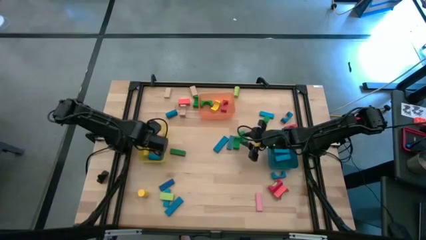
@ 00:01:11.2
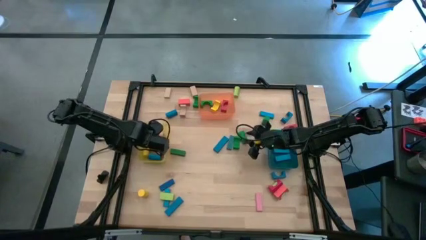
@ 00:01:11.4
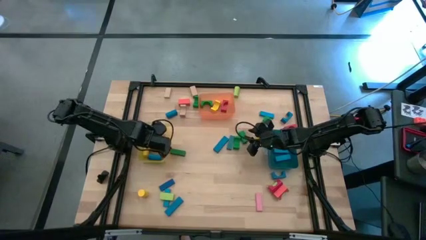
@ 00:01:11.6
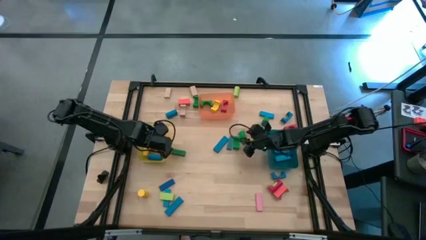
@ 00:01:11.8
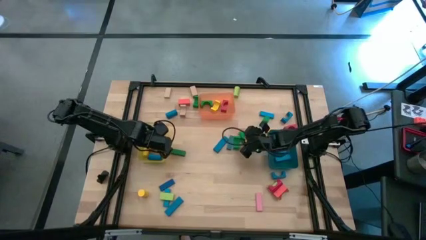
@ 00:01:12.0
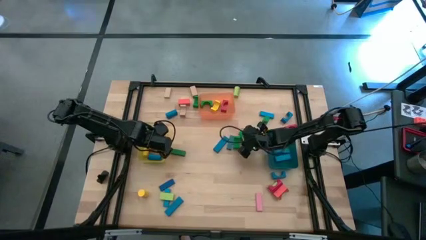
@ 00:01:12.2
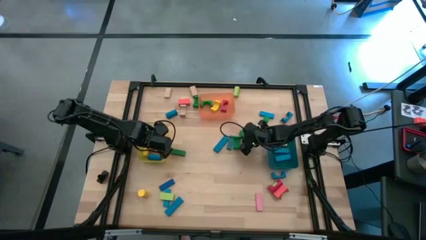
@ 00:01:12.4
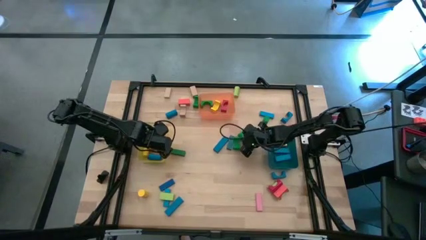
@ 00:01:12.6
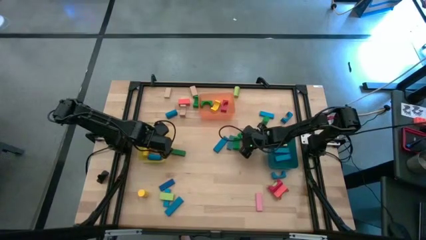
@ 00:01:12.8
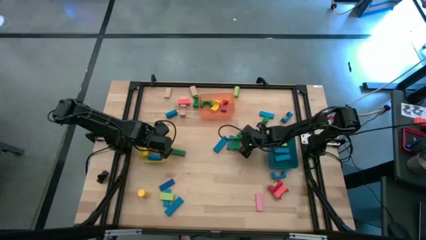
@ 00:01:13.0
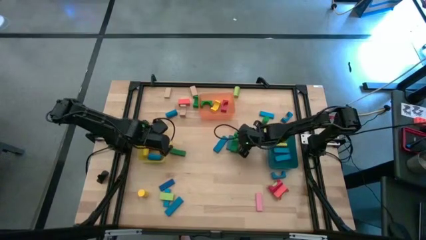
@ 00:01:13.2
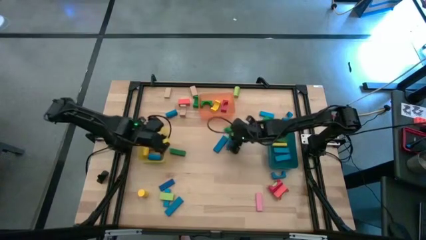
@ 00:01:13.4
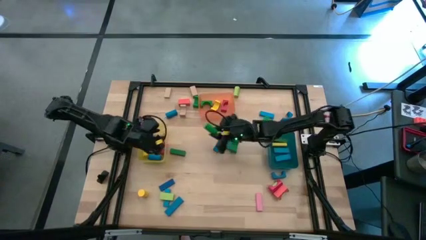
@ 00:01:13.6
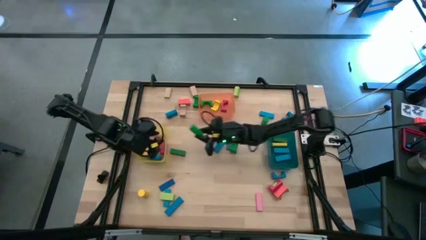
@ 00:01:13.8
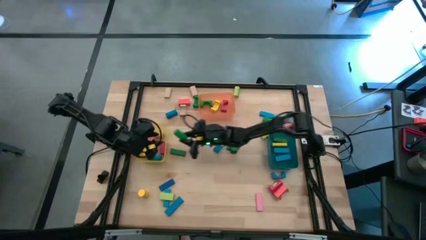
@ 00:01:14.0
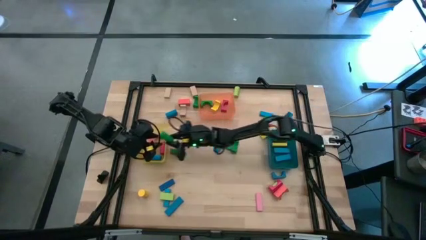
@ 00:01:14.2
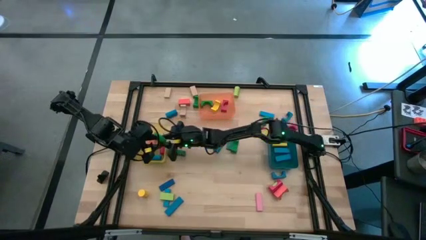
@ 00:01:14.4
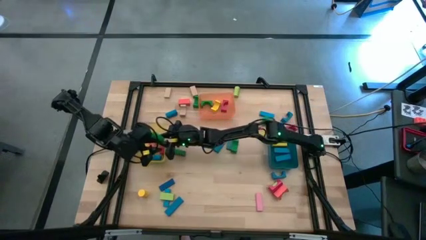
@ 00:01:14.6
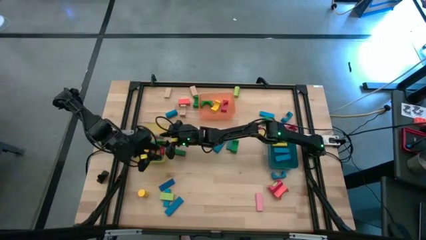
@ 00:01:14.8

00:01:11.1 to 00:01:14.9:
Task: Sort blocks by size
Put the green cylindrical block into the yellow bin

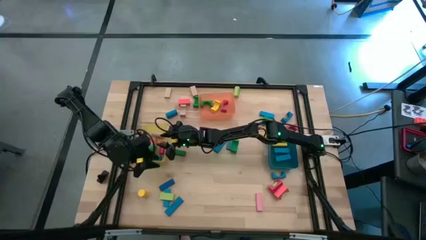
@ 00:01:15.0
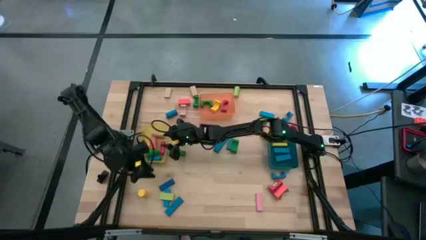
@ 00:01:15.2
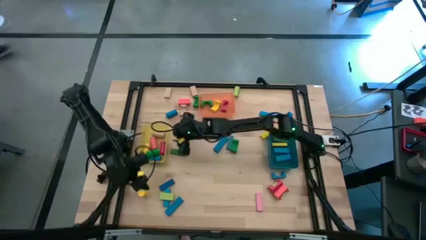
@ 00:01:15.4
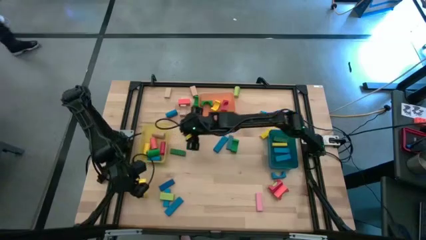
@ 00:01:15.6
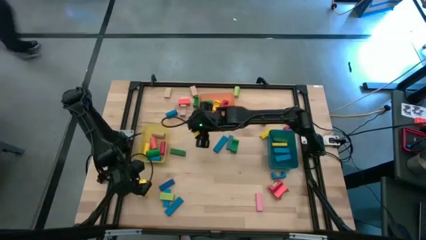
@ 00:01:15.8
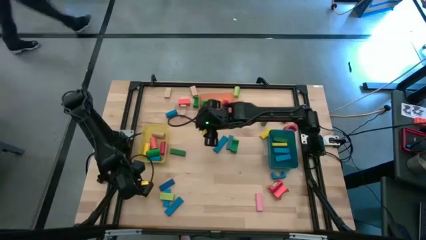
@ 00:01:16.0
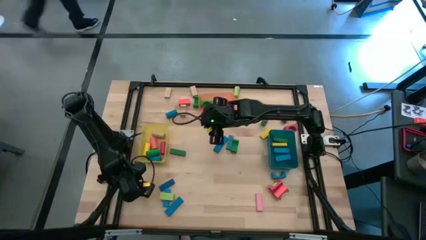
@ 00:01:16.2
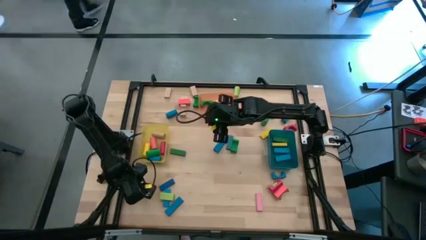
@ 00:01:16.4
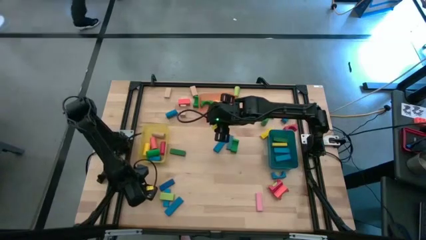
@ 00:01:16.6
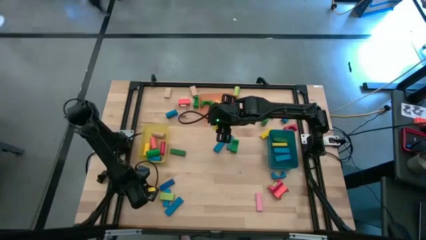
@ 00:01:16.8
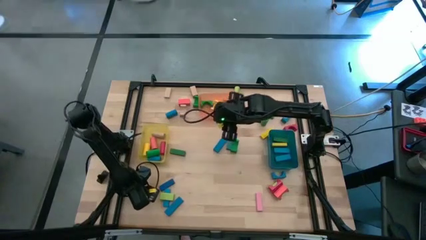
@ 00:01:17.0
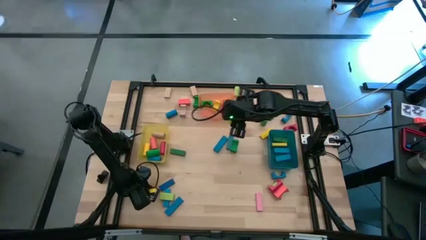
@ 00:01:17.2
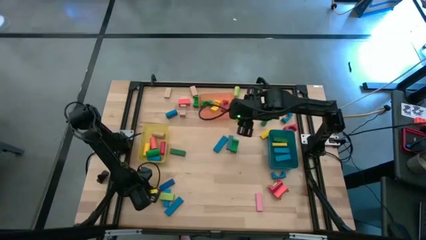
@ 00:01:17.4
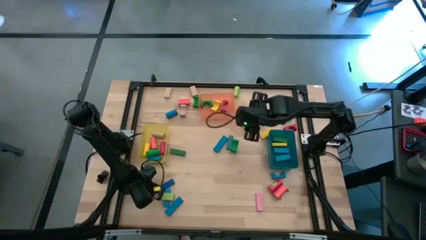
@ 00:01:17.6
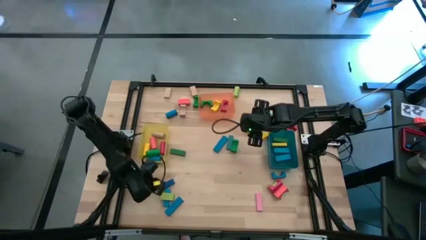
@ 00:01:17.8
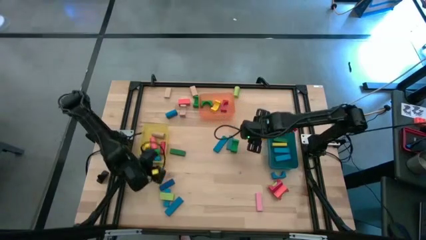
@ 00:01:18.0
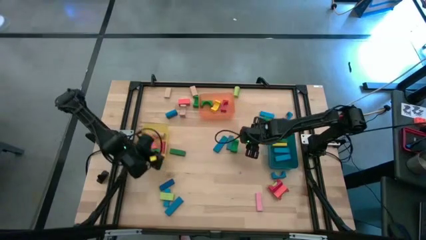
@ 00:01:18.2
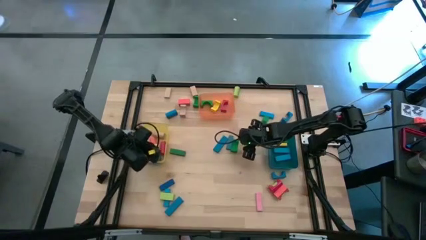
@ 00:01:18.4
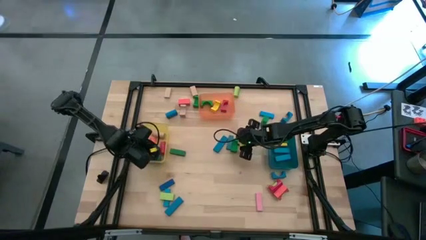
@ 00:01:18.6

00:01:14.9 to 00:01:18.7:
Put the yellow cylindrical block into the yellow bin

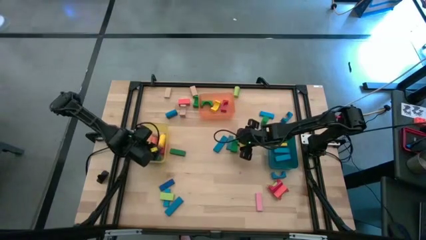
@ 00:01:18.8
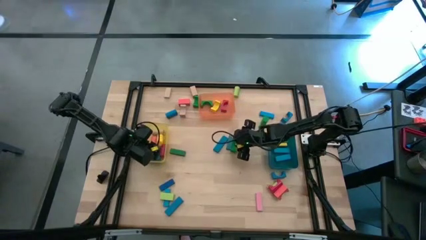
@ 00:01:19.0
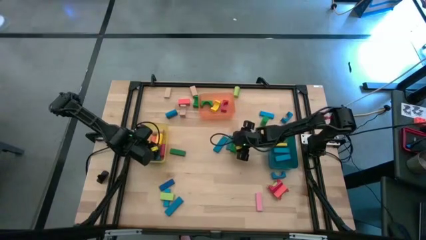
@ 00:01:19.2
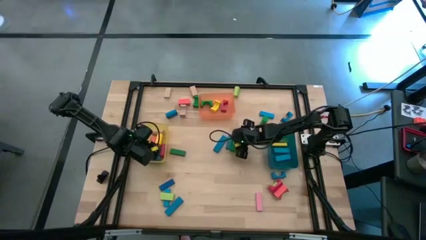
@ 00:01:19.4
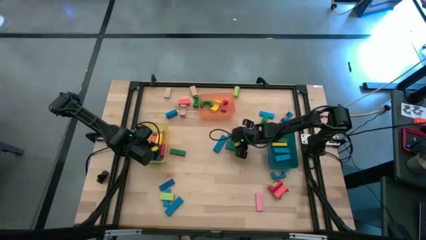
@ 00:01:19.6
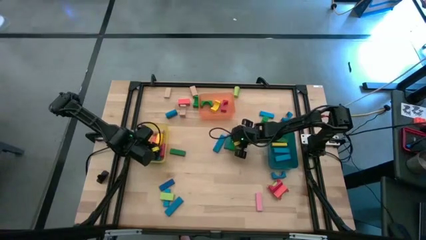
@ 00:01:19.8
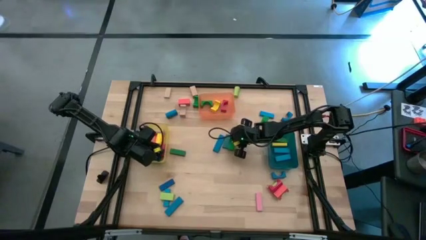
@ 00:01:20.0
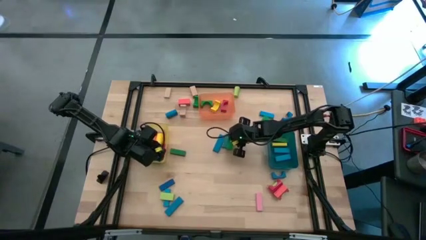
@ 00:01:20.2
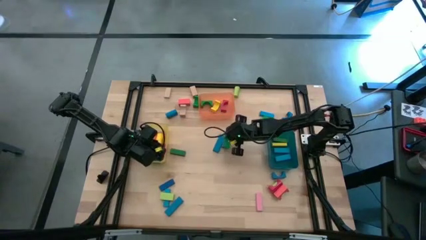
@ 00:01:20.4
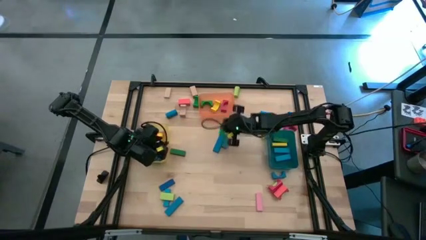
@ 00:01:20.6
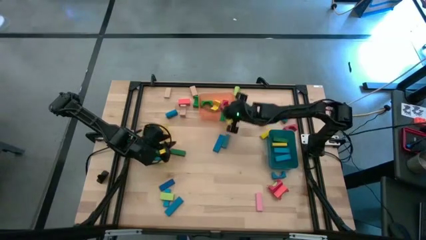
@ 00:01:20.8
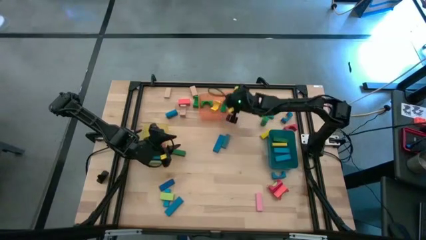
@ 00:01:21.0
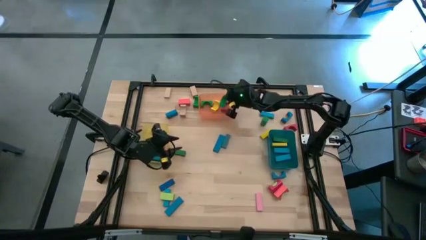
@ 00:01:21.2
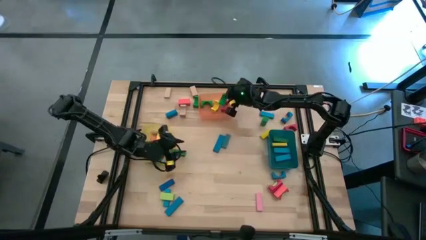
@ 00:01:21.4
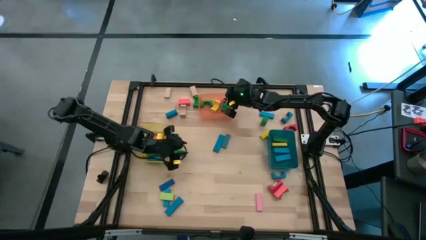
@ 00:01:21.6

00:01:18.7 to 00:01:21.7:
Put the green arch block into the orange bin

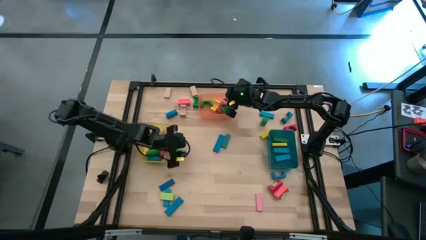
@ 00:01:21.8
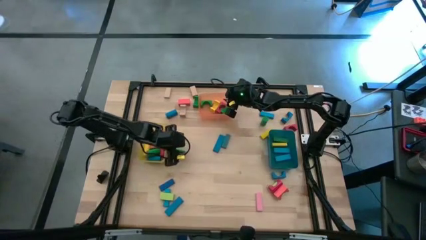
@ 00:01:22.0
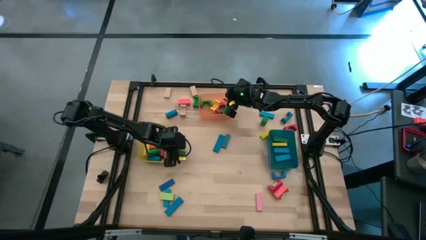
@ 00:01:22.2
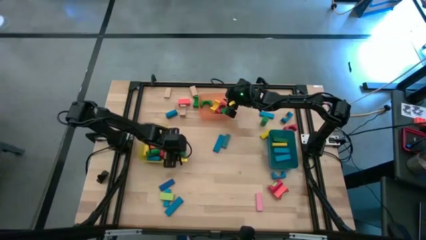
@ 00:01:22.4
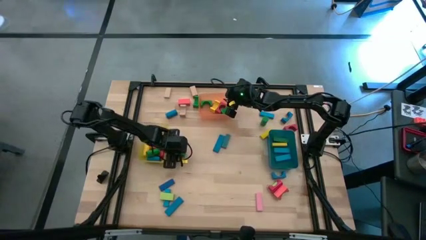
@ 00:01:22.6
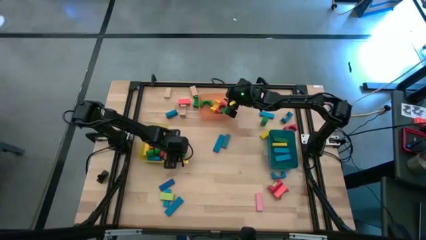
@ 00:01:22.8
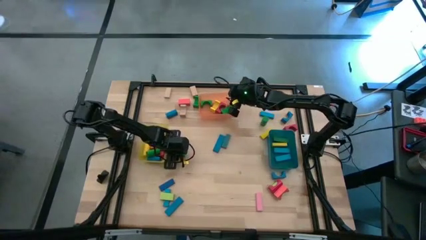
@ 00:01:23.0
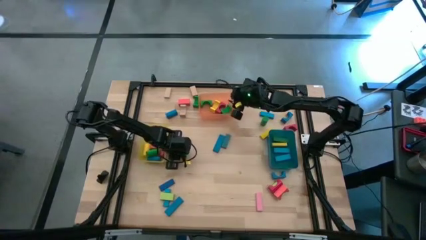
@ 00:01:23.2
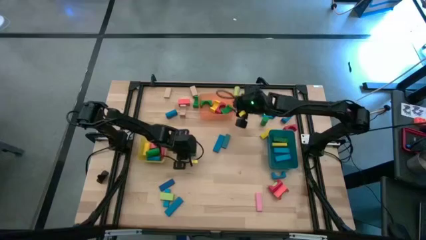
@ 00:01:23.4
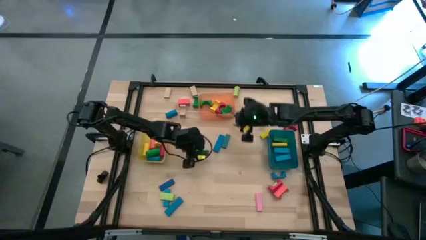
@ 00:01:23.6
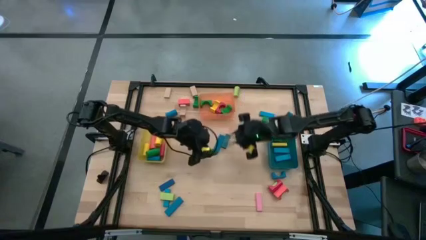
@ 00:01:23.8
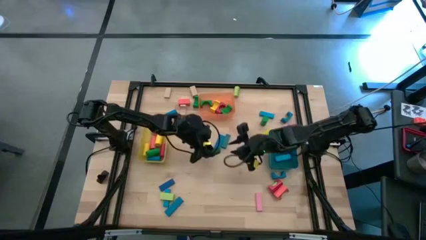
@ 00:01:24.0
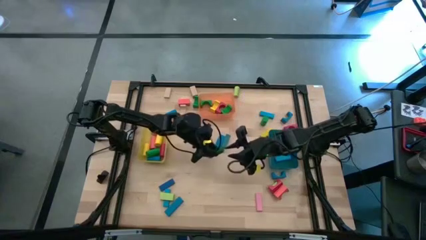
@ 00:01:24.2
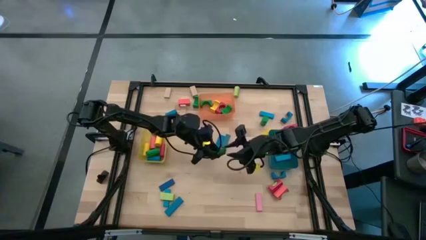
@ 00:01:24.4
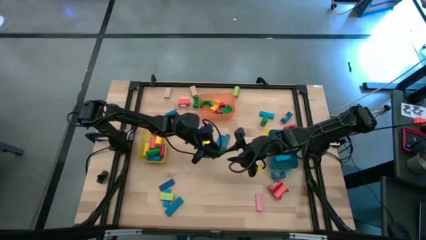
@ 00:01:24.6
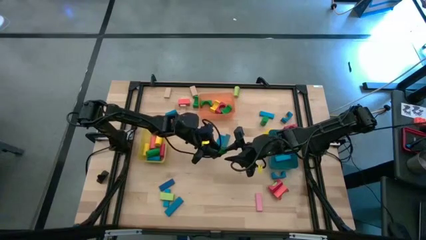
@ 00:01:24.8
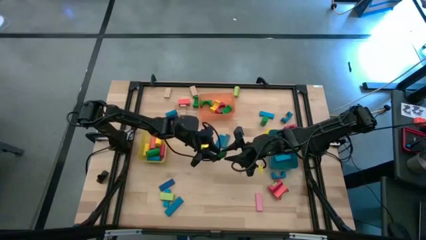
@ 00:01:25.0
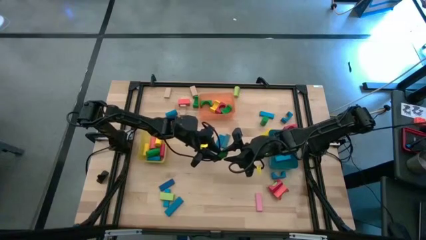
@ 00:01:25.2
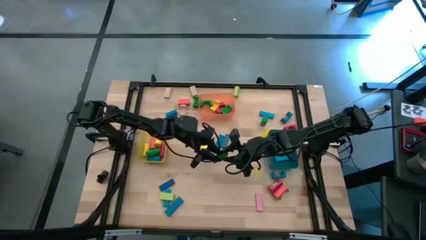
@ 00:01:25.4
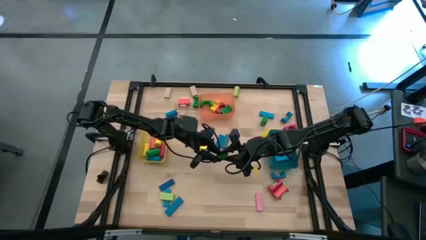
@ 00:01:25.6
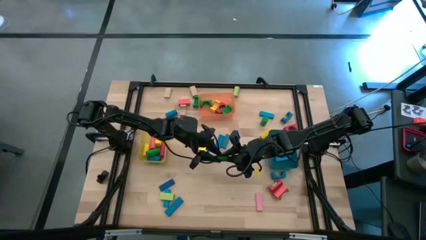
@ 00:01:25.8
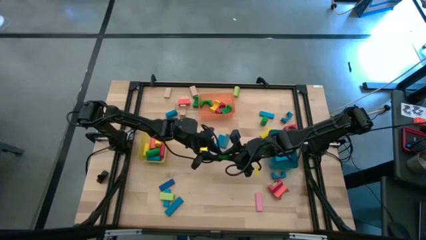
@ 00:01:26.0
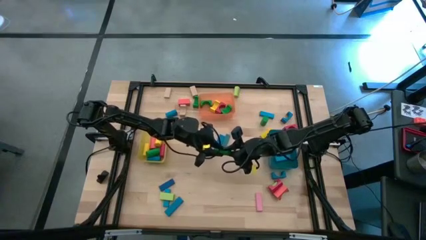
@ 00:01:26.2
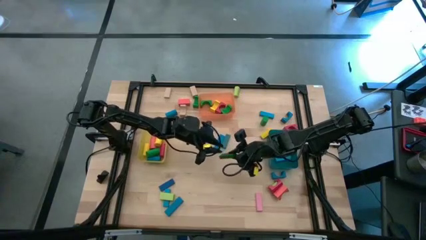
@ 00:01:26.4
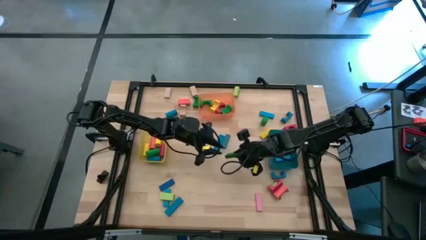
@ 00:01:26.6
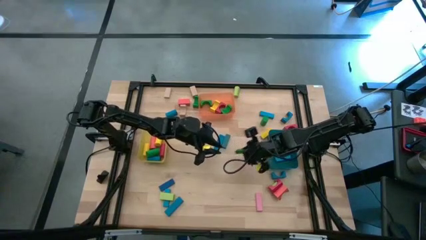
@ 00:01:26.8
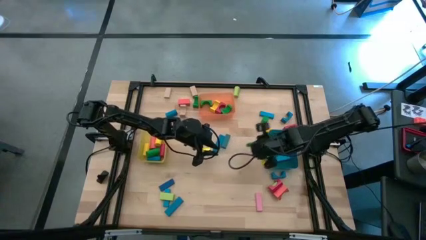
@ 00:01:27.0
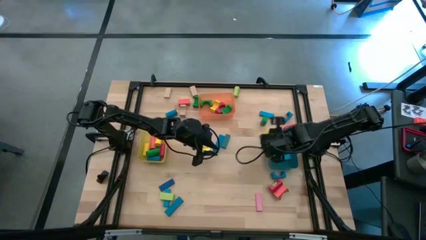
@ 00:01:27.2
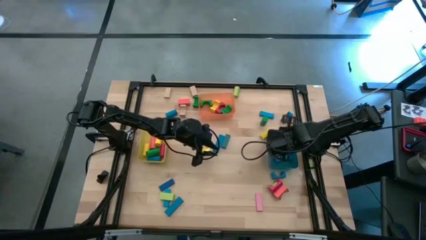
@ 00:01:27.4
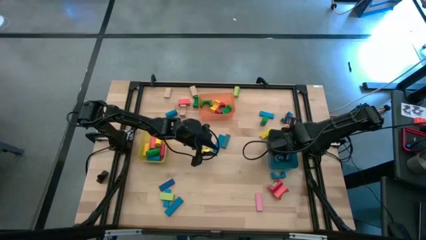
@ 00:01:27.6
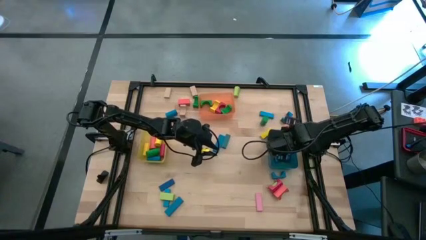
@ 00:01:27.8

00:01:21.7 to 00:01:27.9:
Put the green rectangle block into the blue bin
